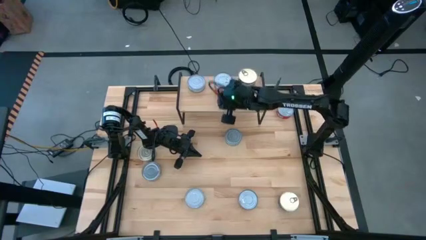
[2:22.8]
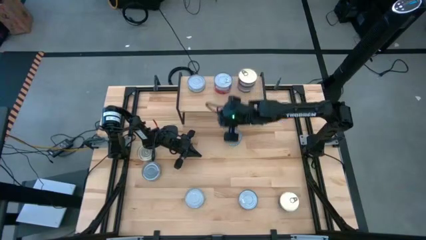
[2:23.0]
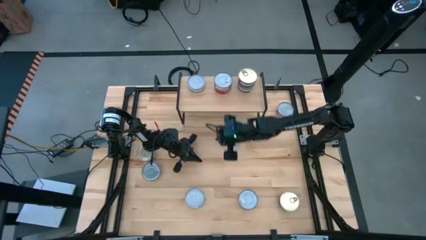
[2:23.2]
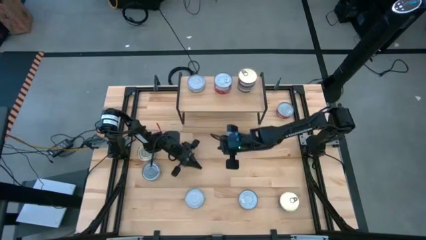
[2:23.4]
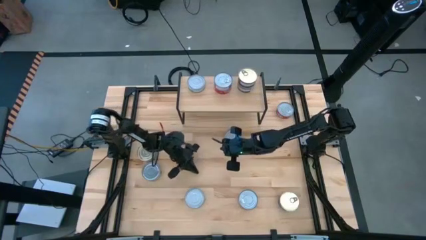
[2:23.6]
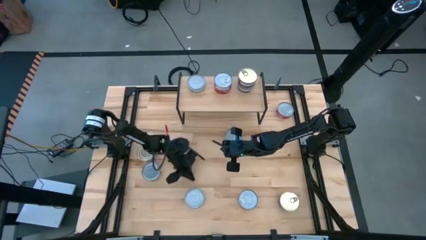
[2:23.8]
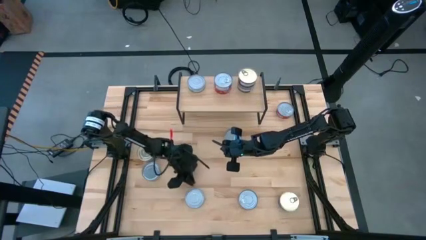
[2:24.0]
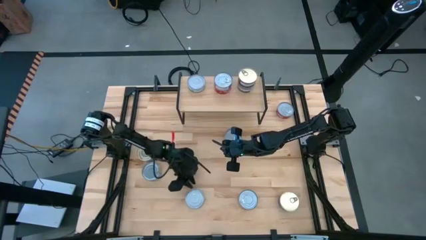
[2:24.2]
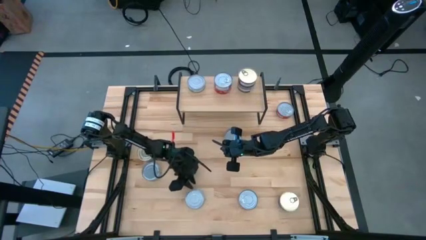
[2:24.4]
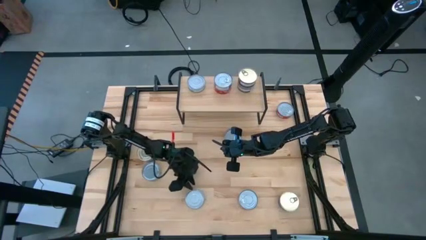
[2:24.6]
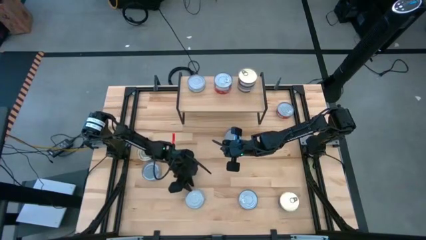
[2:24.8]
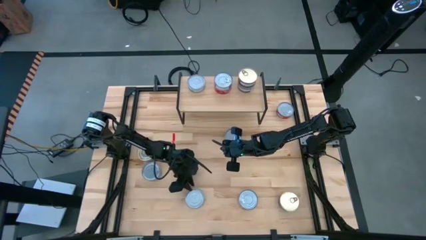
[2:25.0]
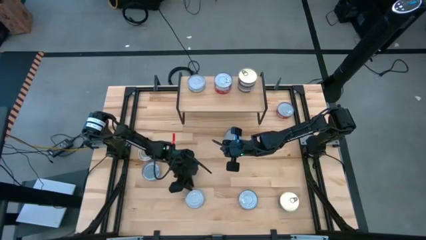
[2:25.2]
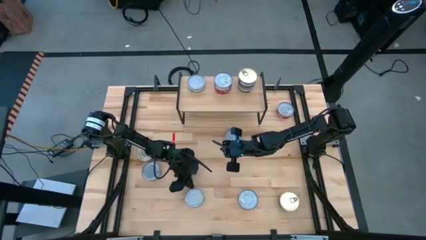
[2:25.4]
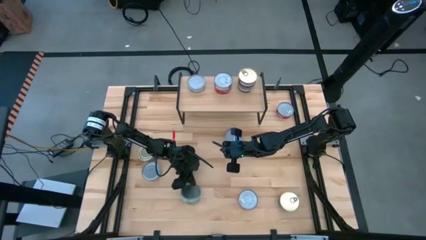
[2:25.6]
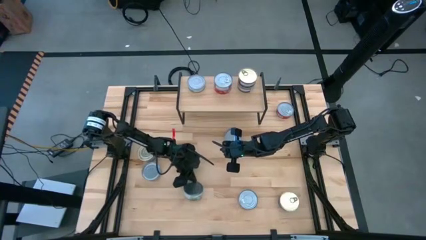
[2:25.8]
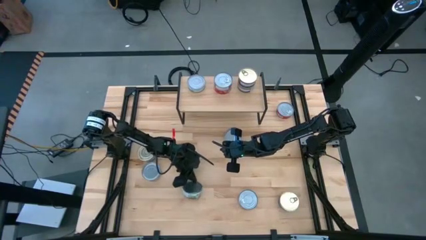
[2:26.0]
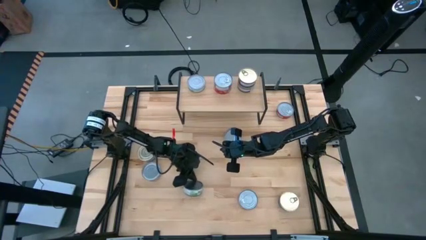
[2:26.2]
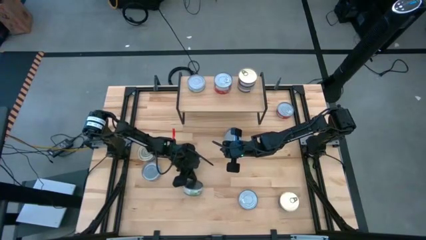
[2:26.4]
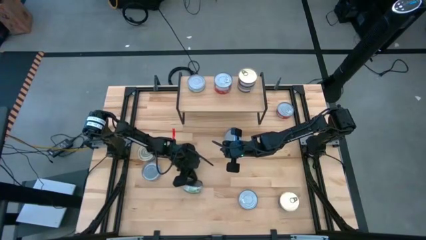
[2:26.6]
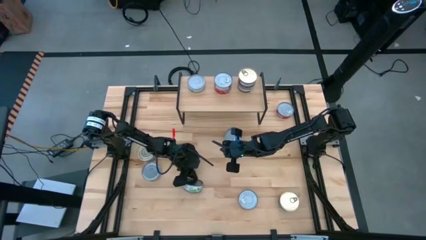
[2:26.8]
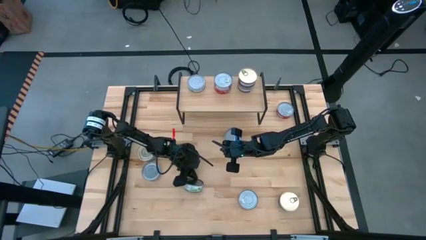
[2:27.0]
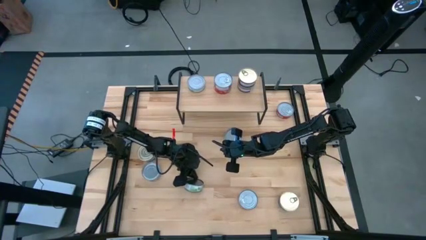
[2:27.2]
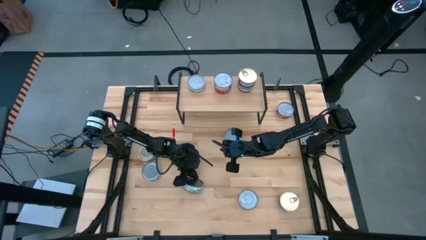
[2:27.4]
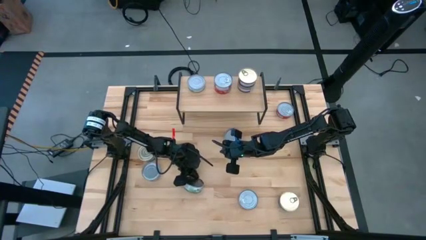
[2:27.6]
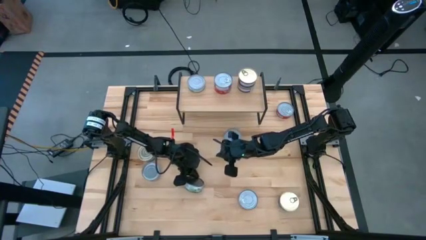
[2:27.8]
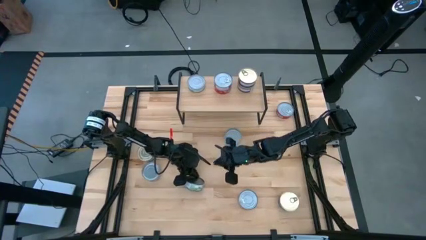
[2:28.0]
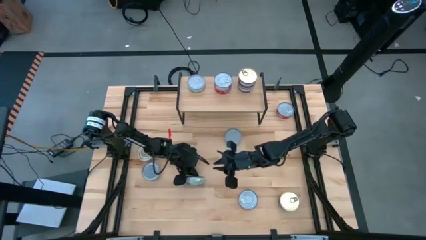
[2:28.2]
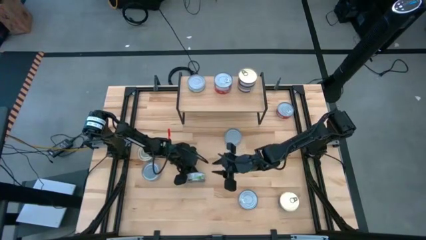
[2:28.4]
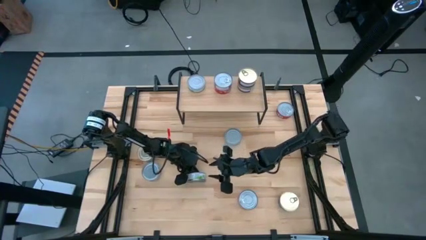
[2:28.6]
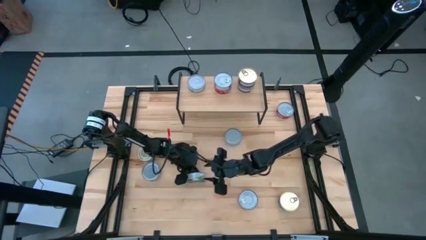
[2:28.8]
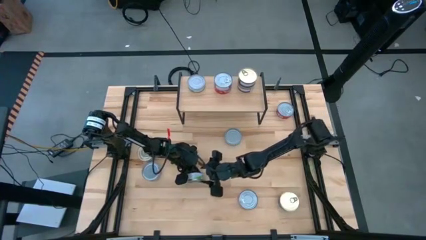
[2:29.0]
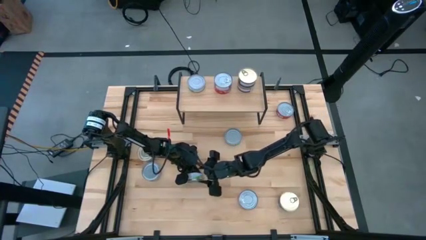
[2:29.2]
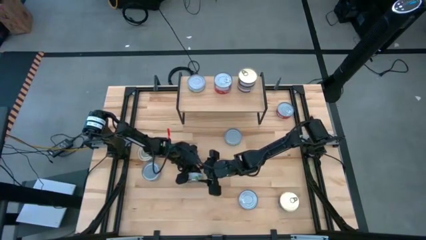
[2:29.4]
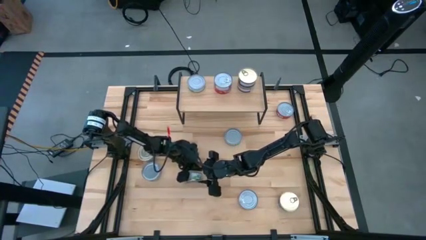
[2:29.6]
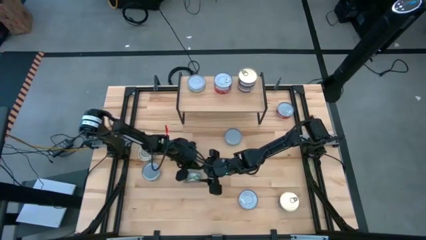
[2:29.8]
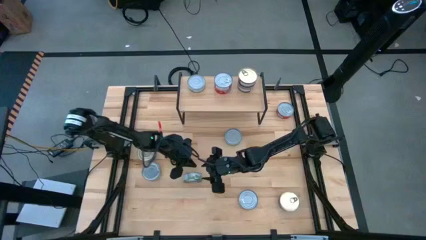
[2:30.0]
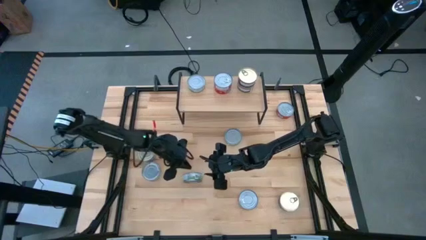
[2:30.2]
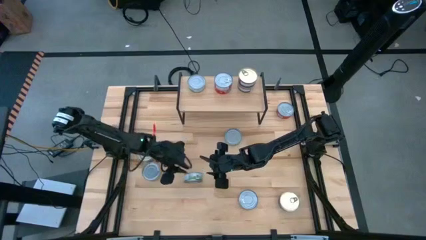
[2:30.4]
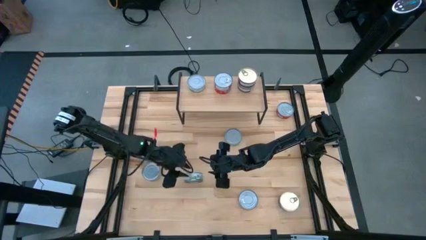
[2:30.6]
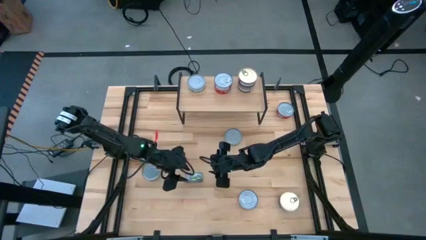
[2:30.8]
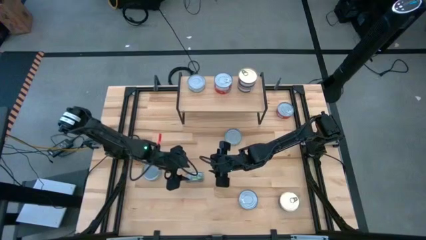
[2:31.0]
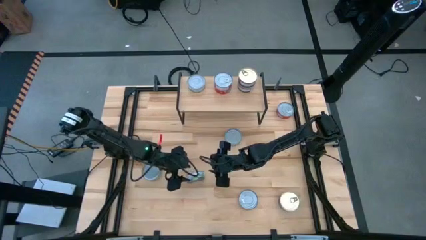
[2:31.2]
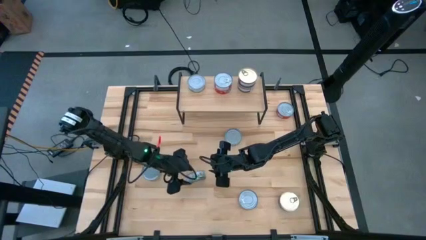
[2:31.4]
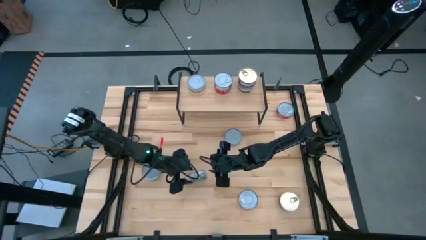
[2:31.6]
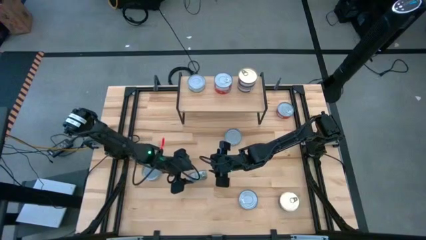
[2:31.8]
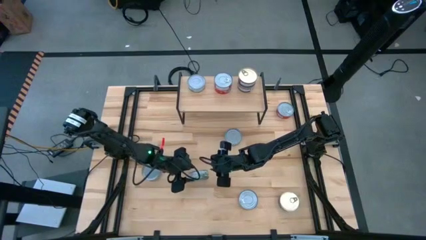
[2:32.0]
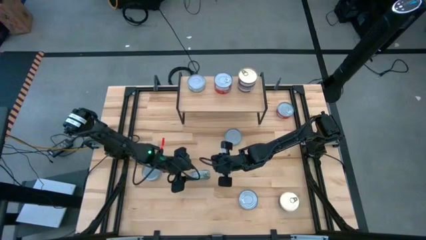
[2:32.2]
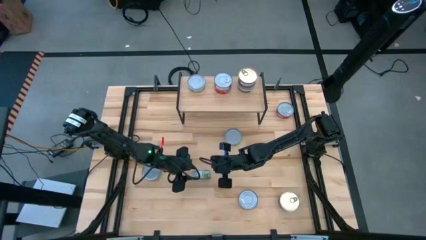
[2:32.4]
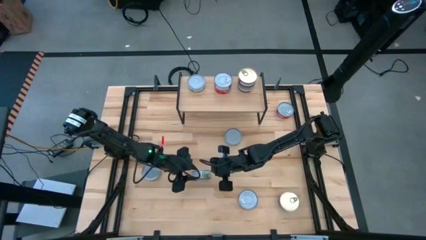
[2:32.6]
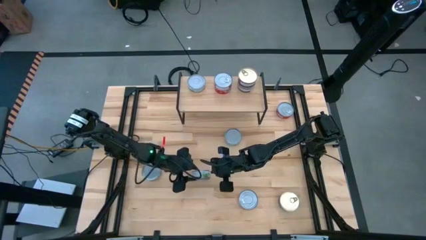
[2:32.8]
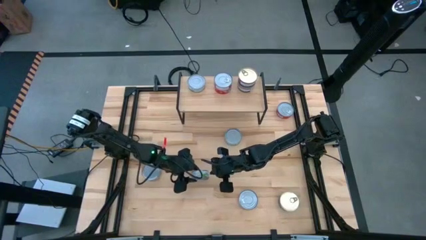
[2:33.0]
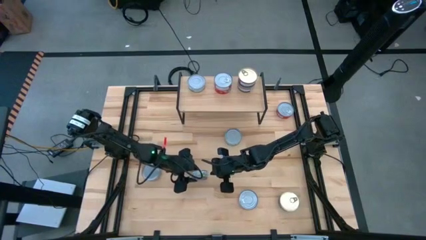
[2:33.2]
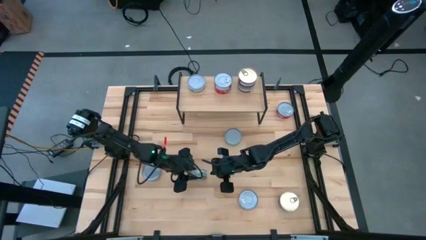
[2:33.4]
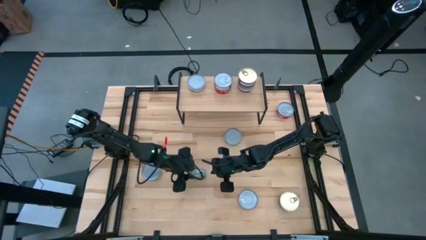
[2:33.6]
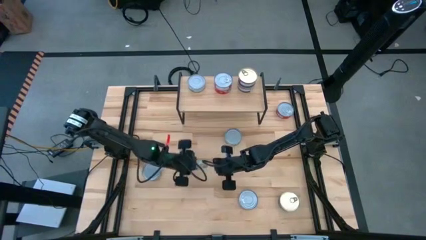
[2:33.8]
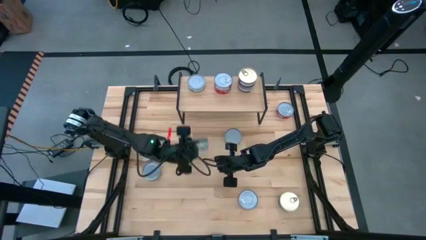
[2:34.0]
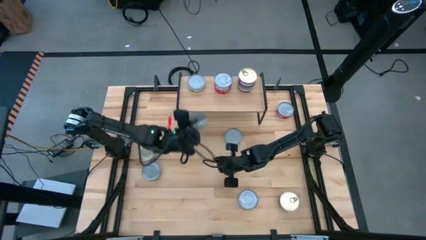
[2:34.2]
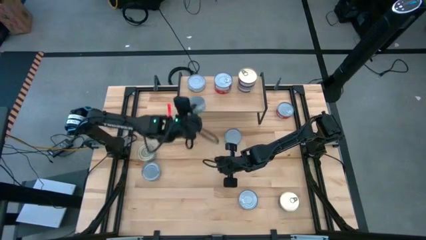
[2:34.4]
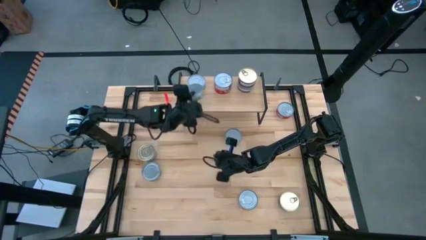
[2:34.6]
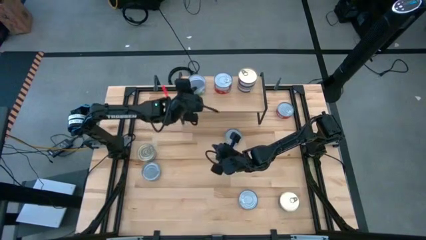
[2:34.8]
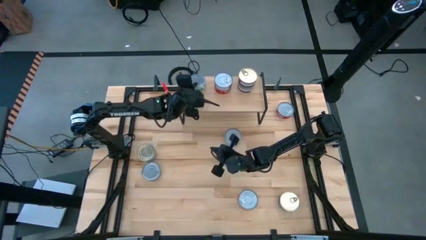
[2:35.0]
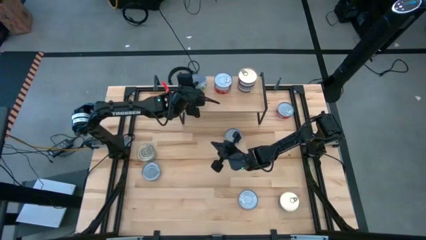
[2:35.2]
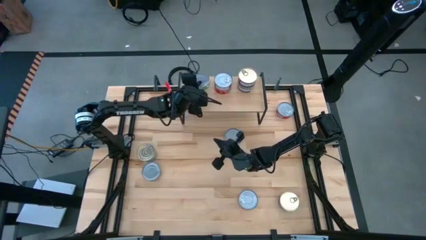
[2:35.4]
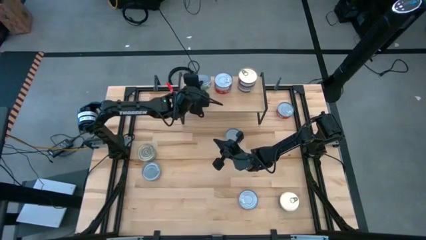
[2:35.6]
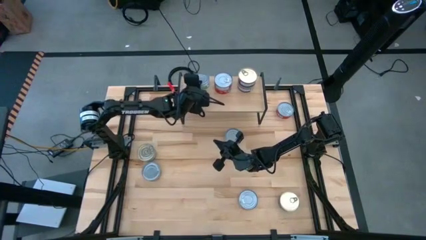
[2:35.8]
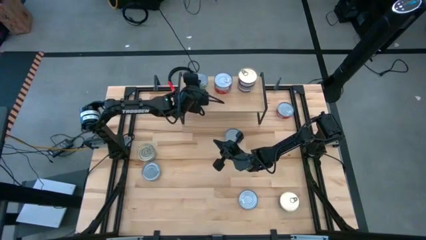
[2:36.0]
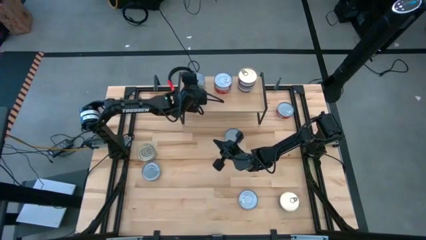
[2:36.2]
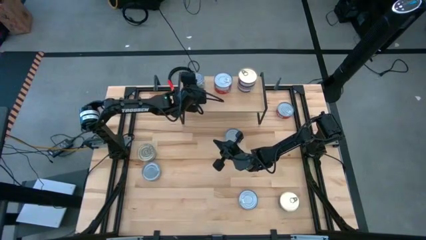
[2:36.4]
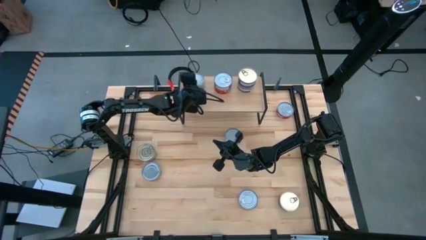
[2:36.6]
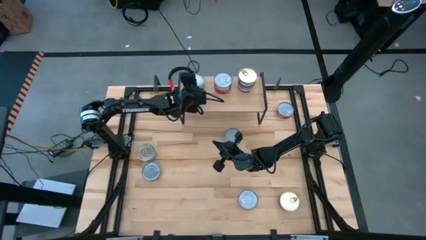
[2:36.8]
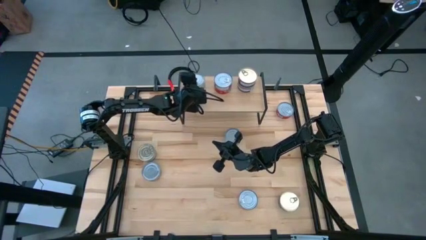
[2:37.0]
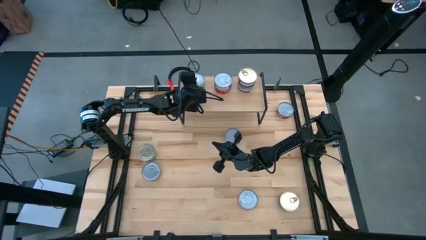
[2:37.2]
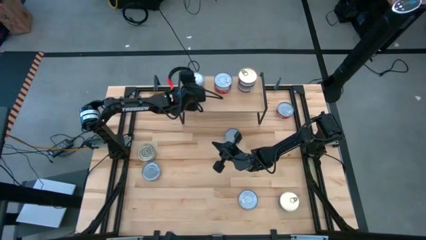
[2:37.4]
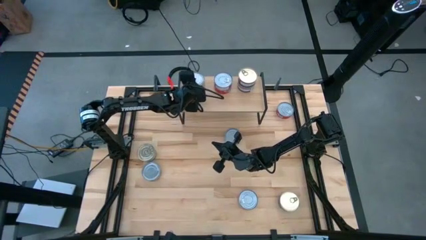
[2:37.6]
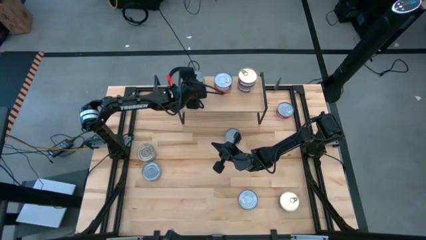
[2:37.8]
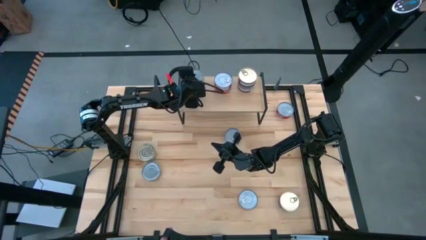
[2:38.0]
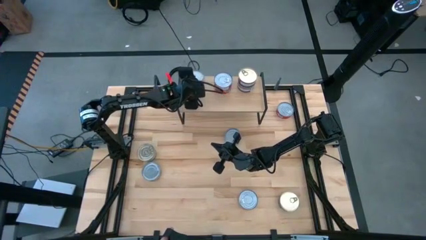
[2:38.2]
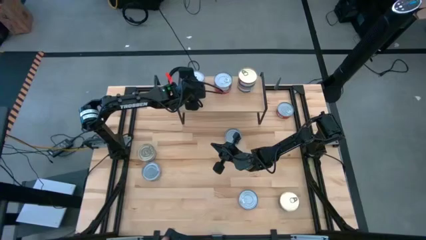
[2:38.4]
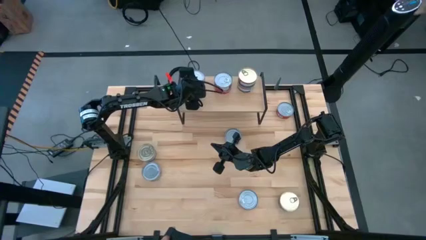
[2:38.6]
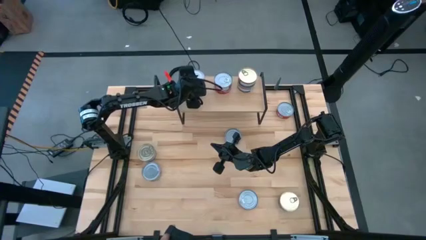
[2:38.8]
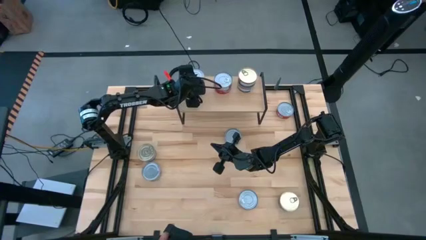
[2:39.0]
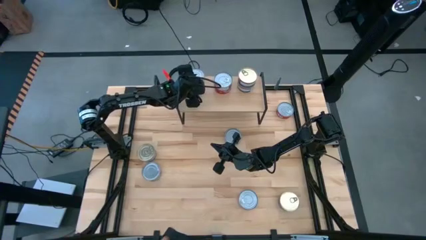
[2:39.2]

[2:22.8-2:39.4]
Task: Stack canned seafood by type on shelf
Stack the green and white tuna can on top of the green and white tuna can on the shelf
